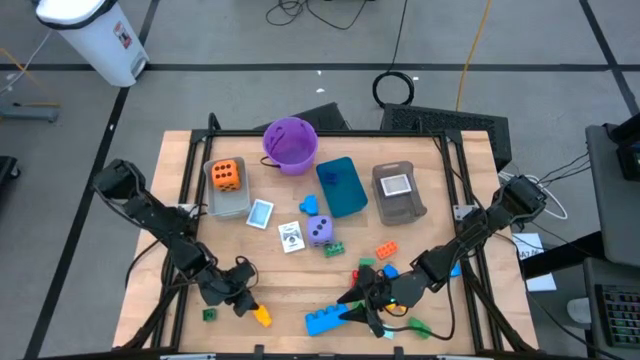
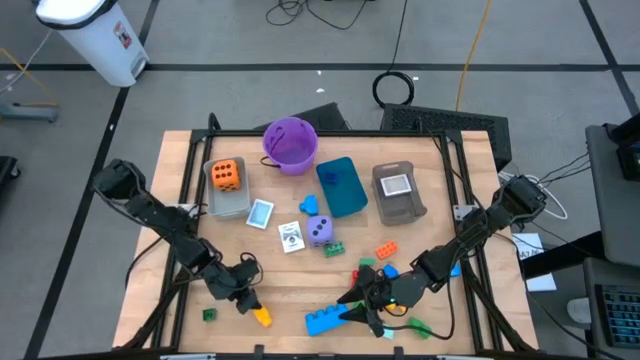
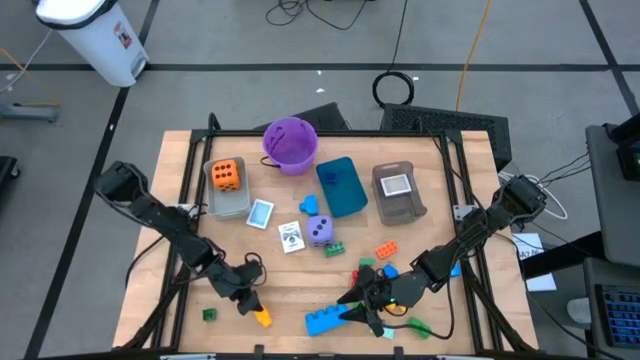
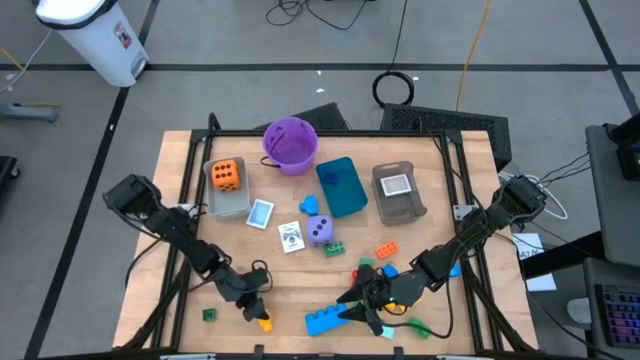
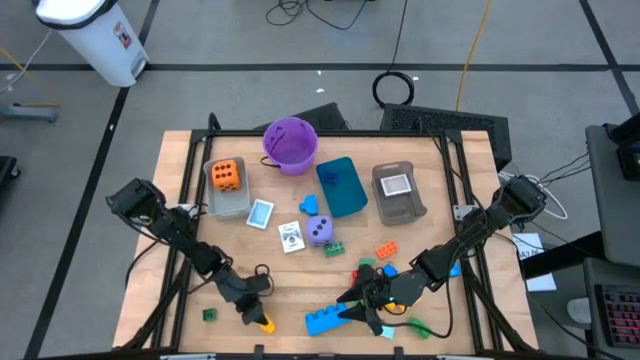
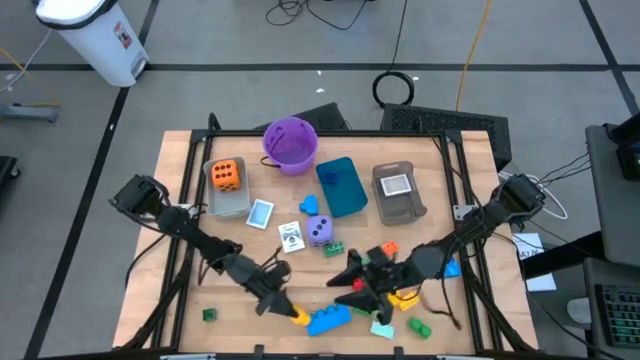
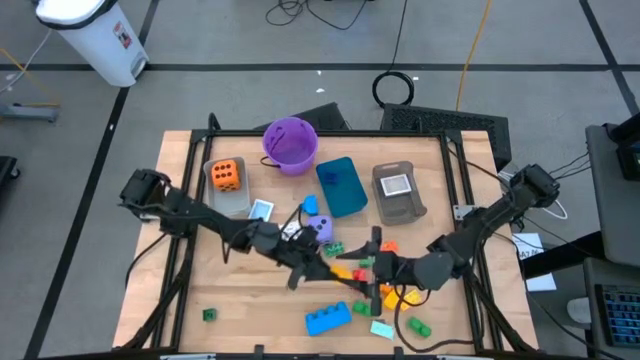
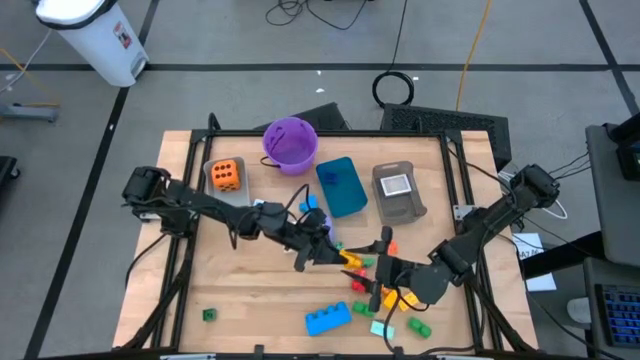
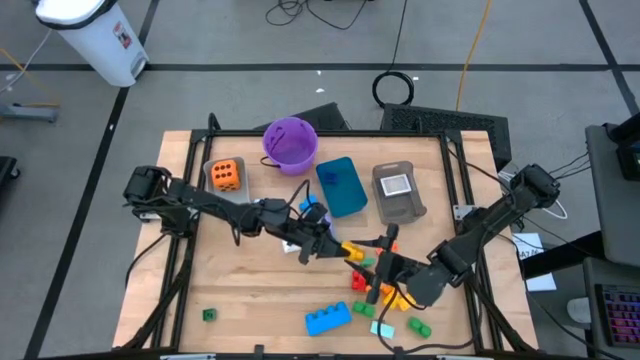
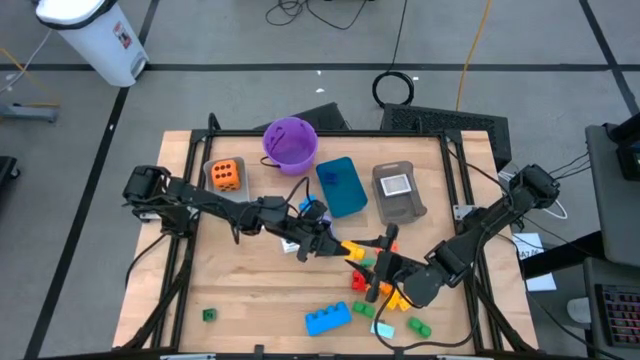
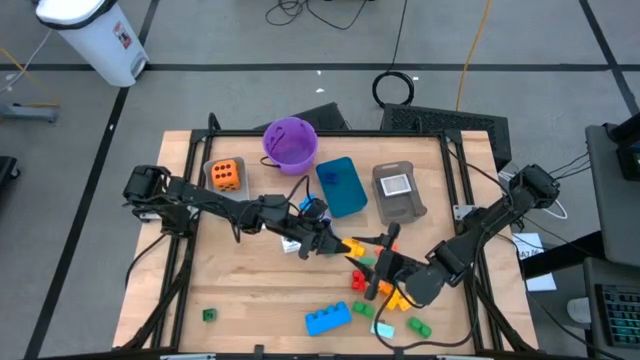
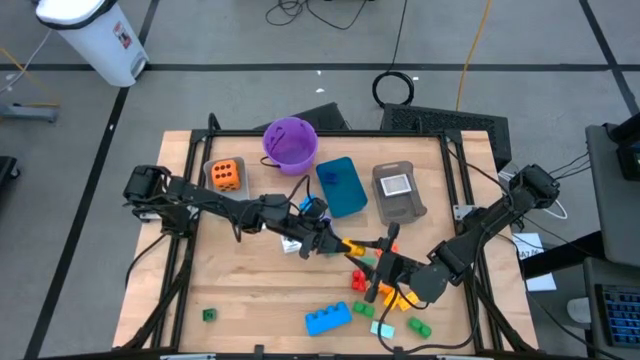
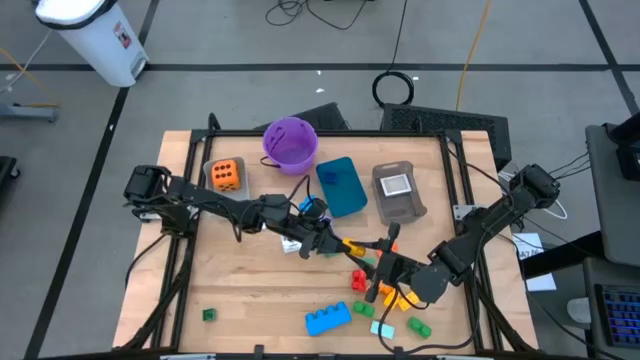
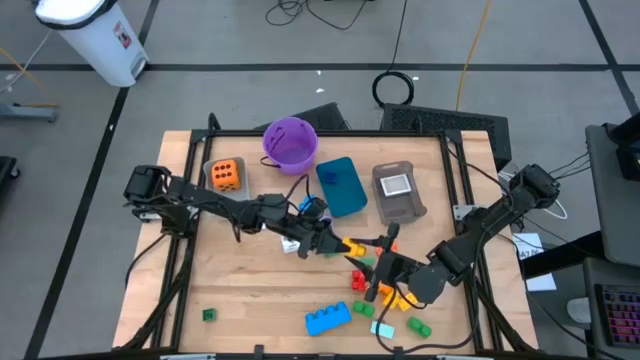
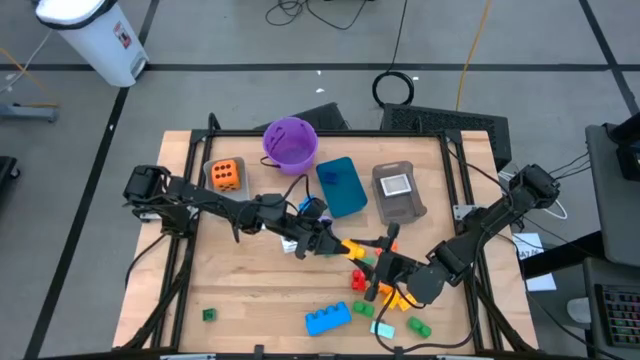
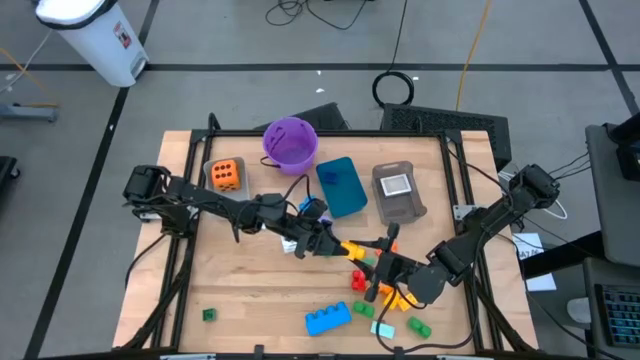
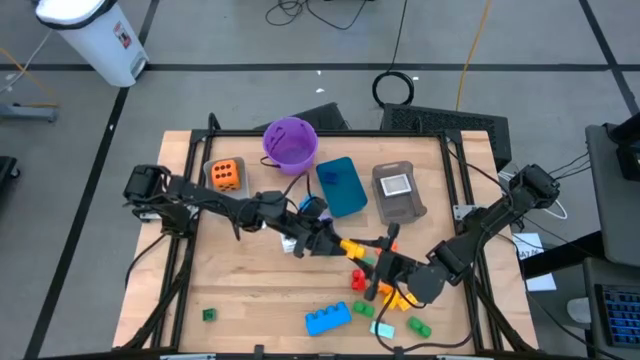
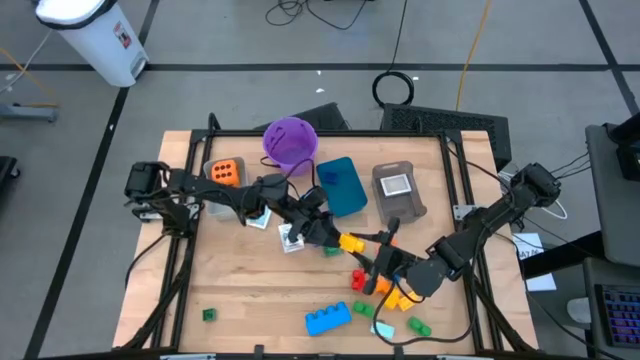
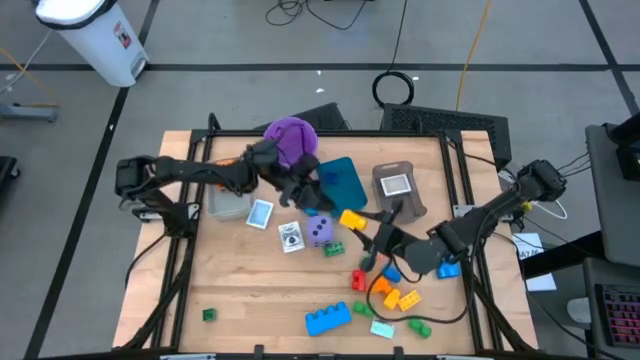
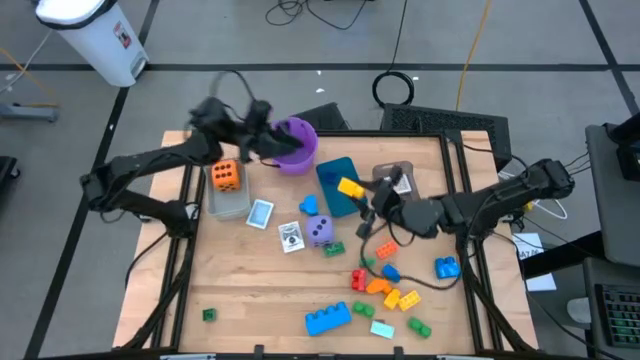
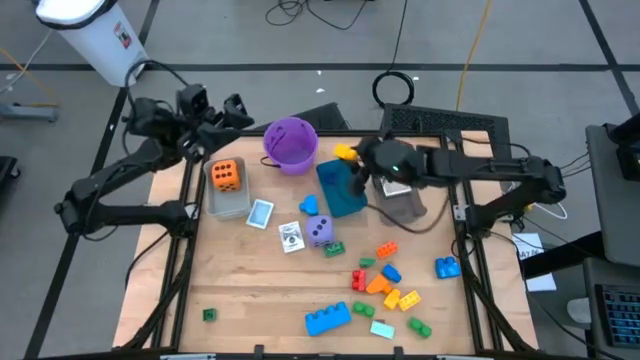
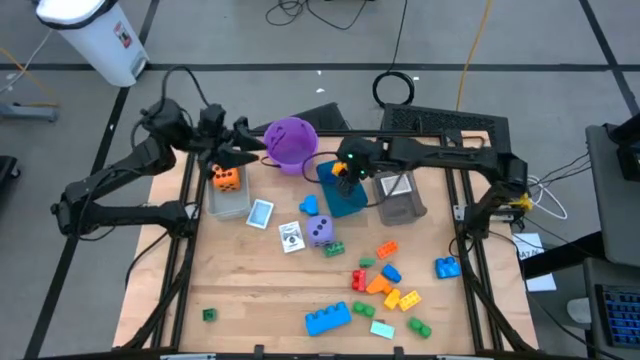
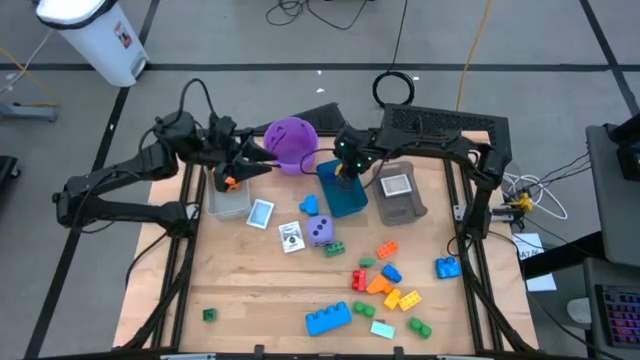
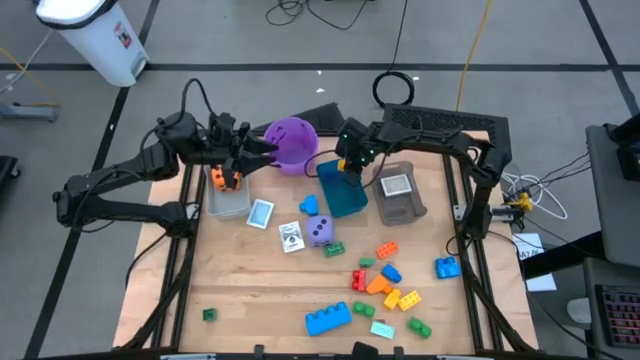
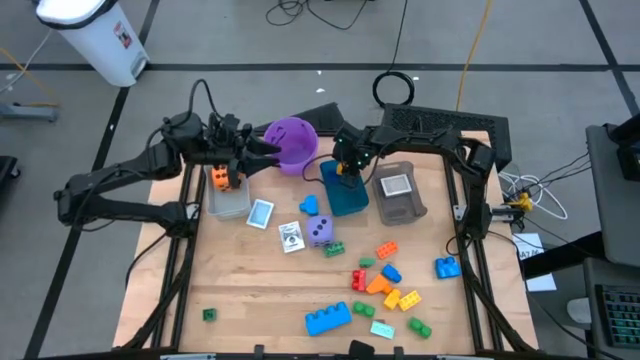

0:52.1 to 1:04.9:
Task: Pick & Place Toys
Put the yellow game piece into the blue bin
